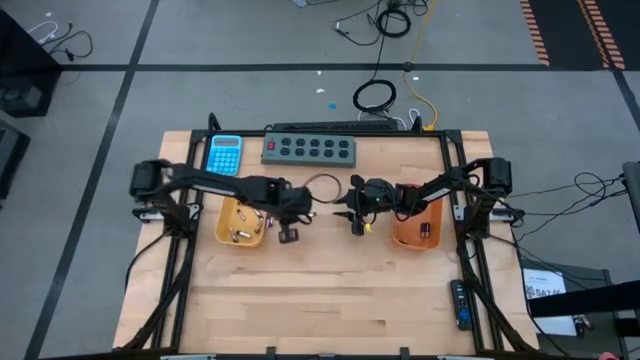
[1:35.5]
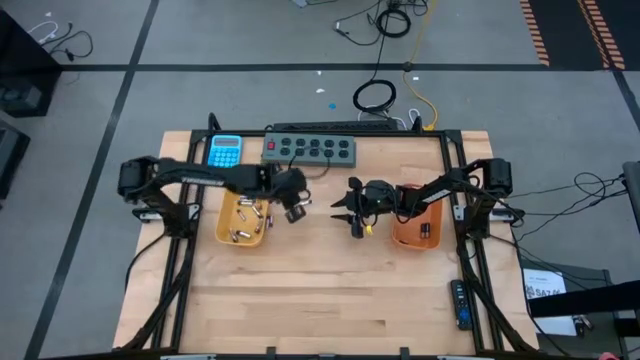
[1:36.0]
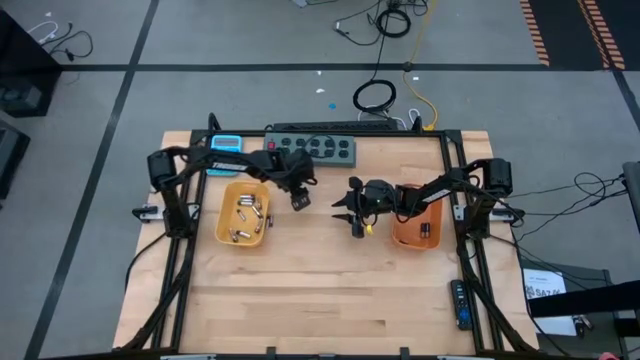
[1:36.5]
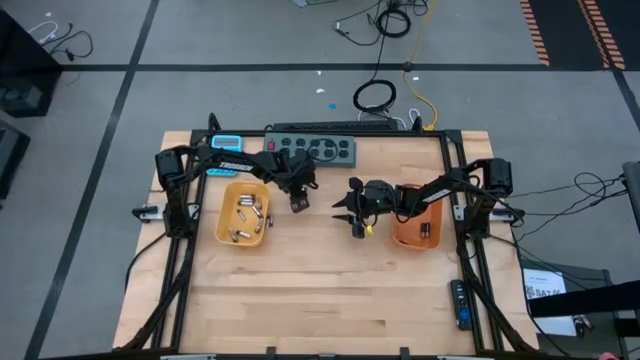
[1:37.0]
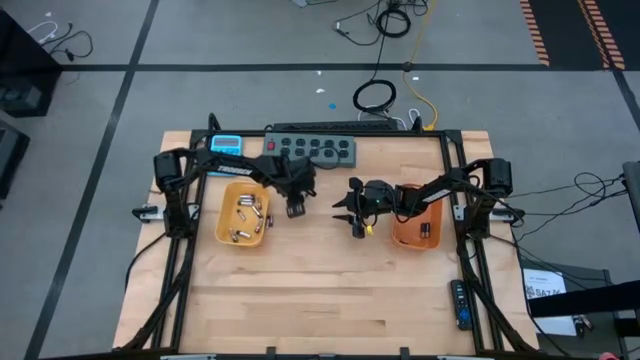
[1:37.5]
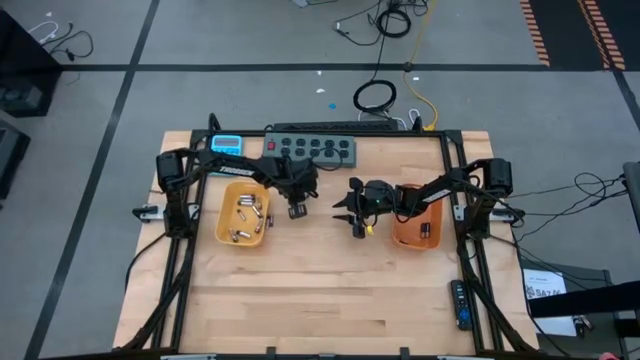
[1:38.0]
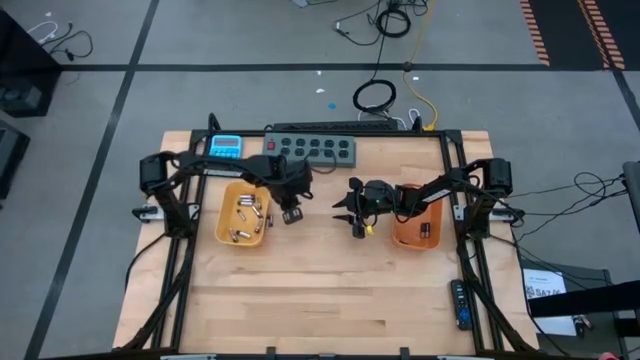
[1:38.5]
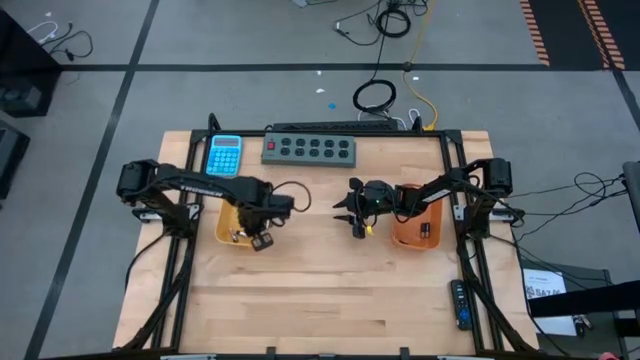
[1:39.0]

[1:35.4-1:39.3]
Task: Sort batteries
Put the white battery into the yellow bin

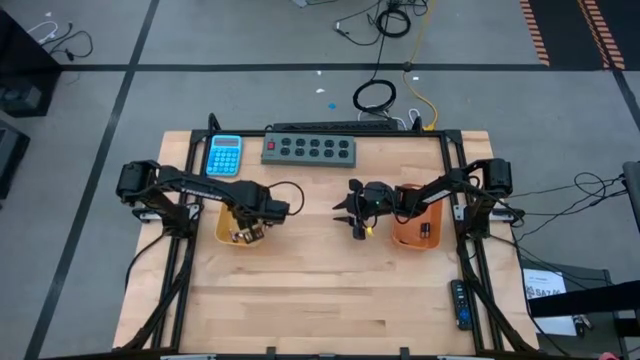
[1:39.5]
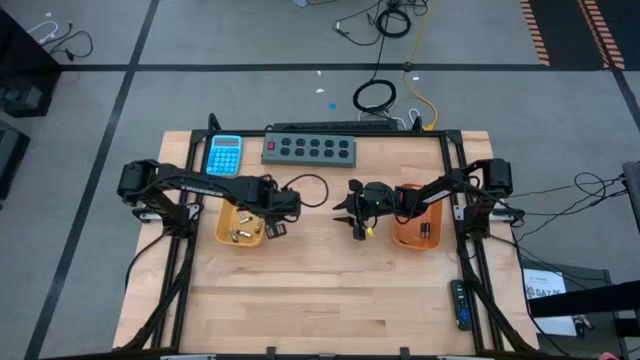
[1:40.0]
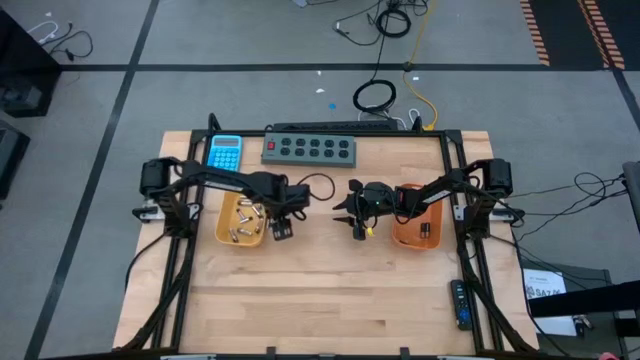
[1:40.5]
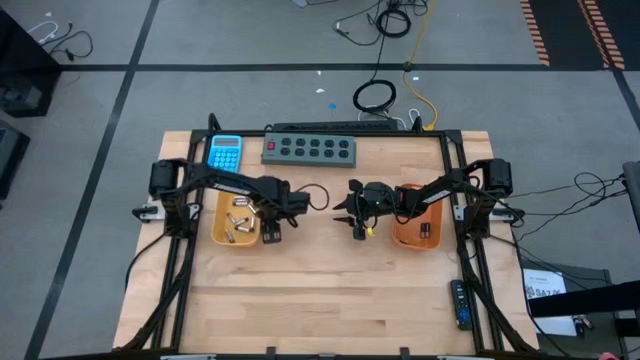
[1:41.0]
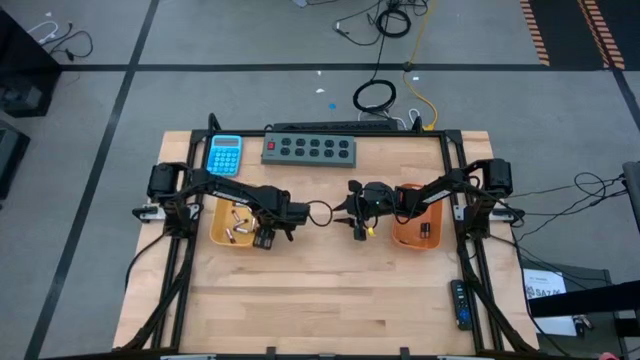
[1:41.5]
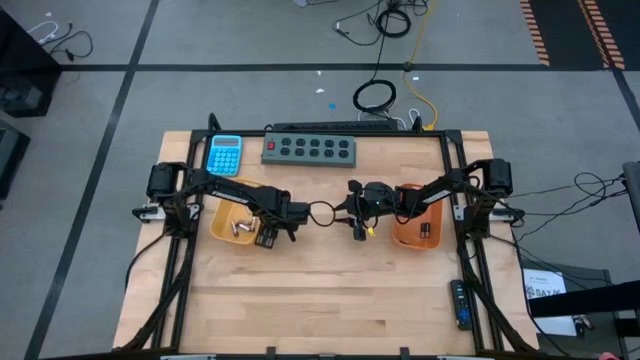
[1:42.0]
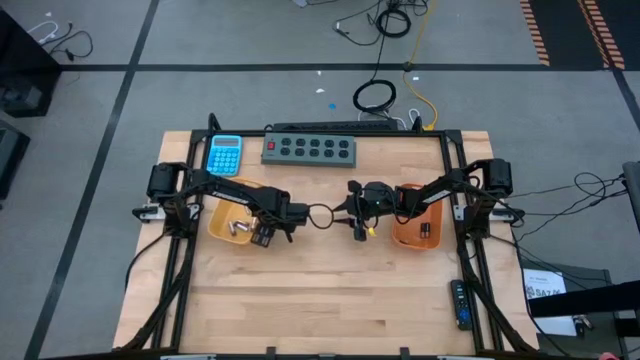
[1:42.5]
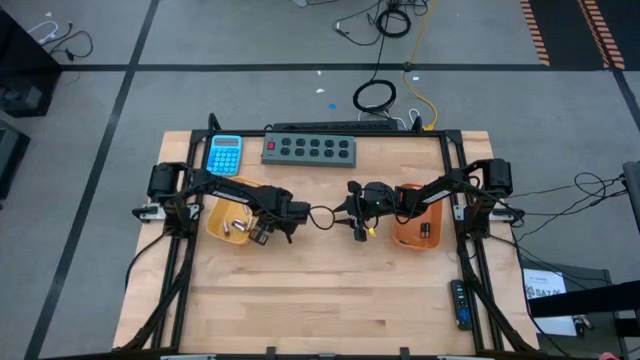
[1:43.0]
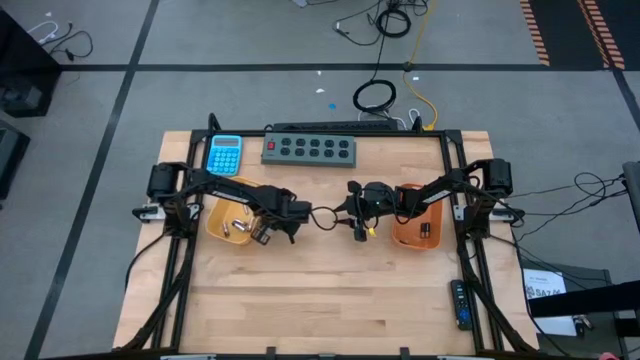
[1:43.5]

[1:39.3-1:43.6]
Put the white battery into the yellow bin

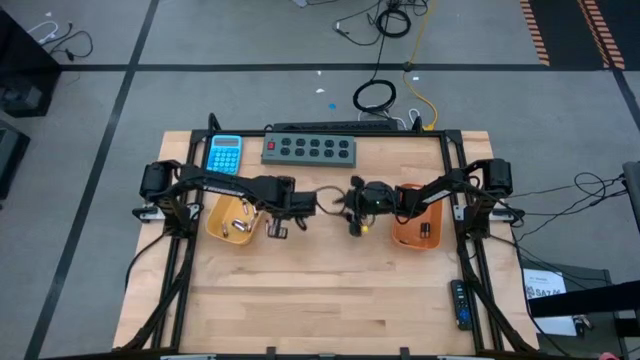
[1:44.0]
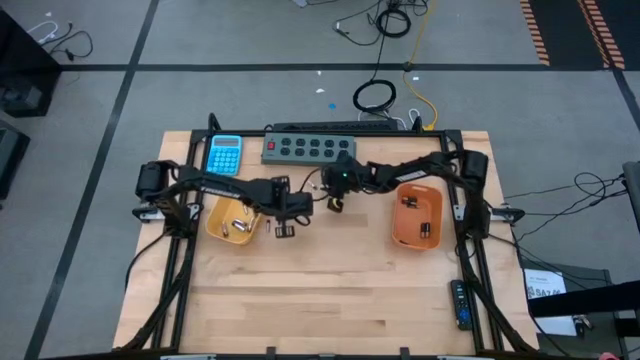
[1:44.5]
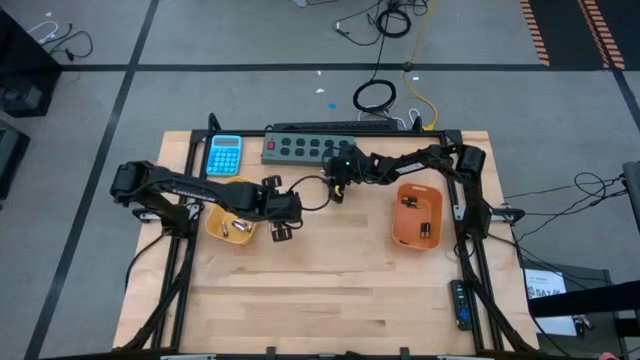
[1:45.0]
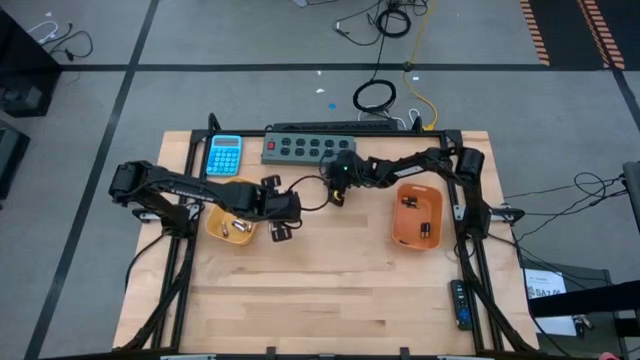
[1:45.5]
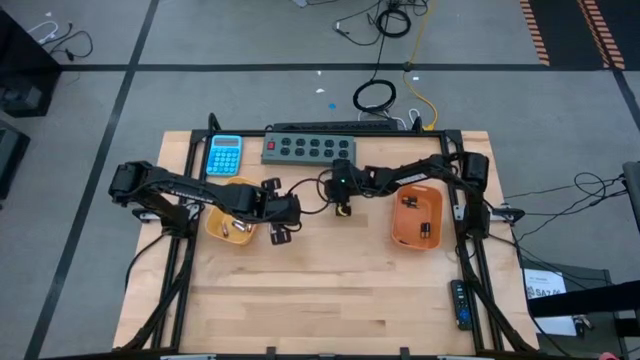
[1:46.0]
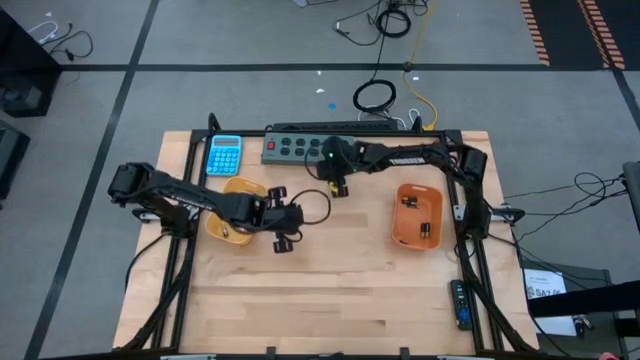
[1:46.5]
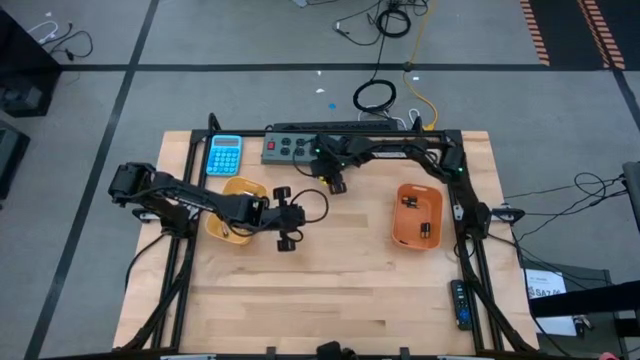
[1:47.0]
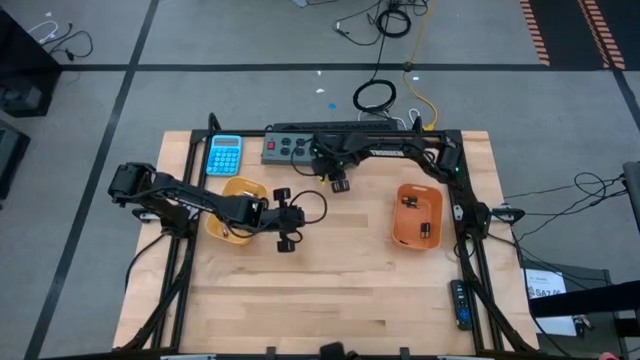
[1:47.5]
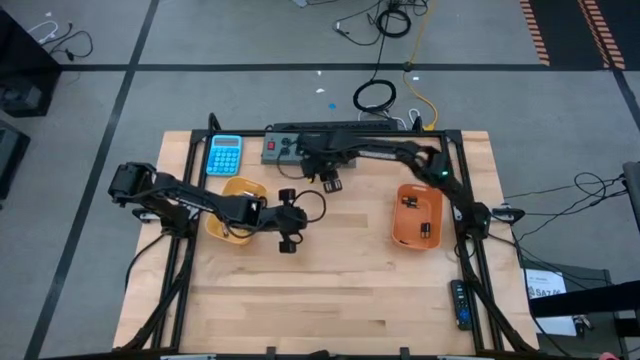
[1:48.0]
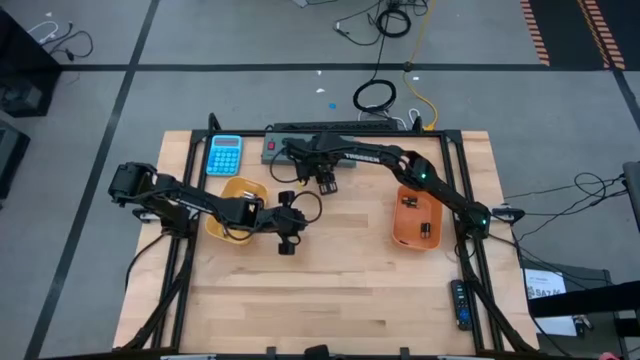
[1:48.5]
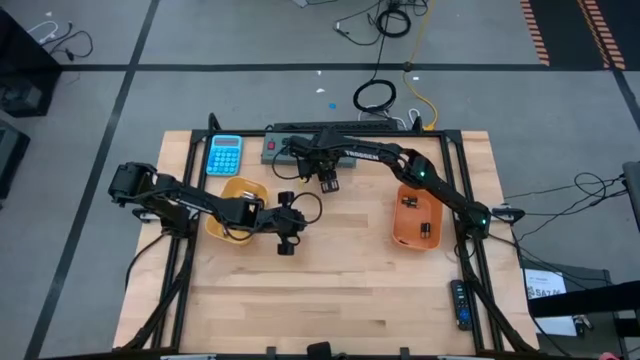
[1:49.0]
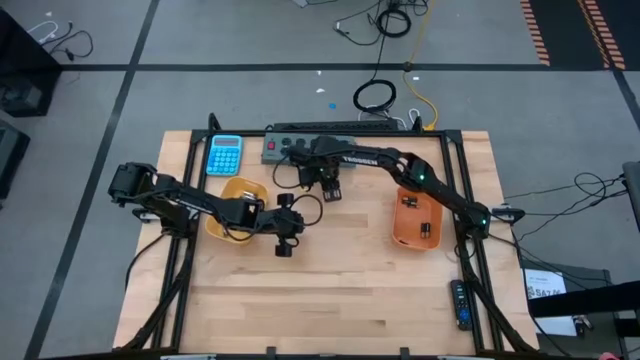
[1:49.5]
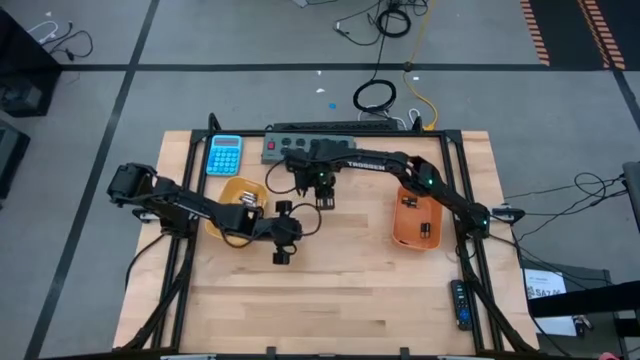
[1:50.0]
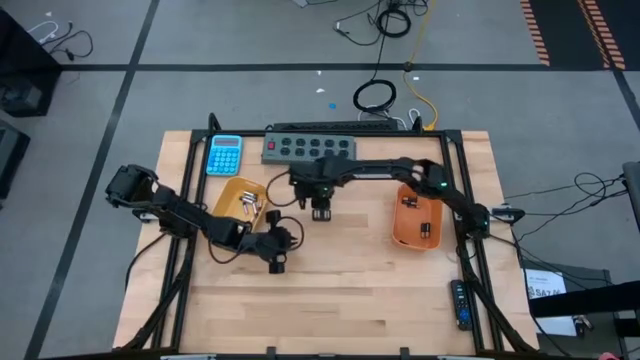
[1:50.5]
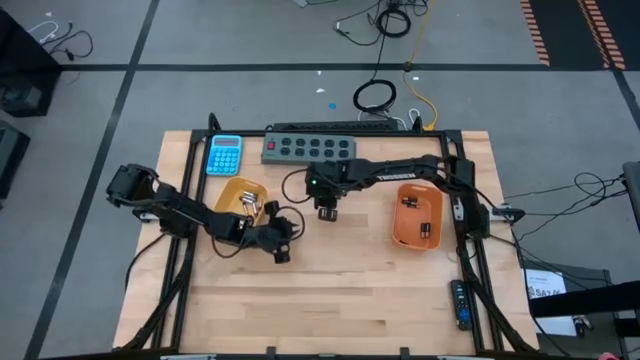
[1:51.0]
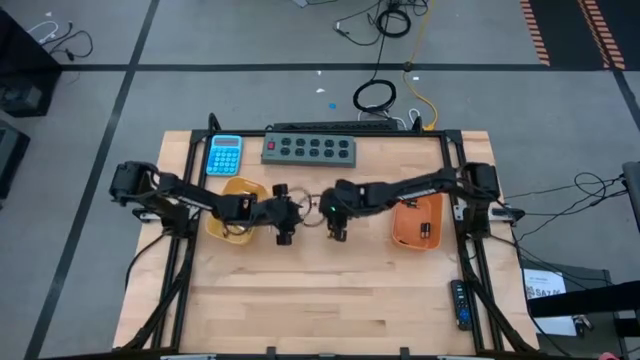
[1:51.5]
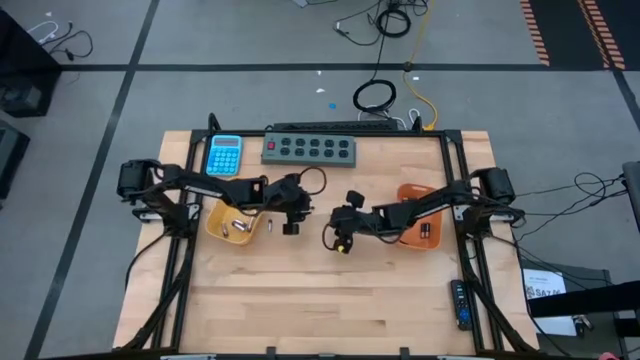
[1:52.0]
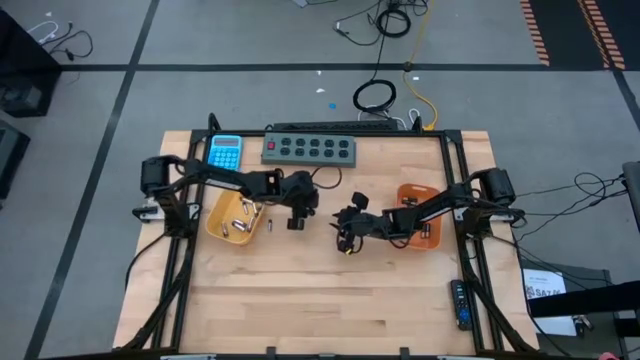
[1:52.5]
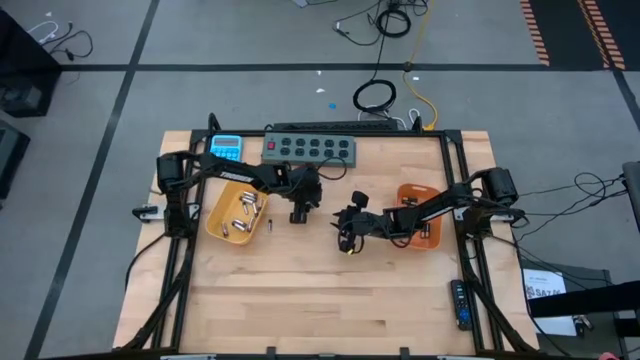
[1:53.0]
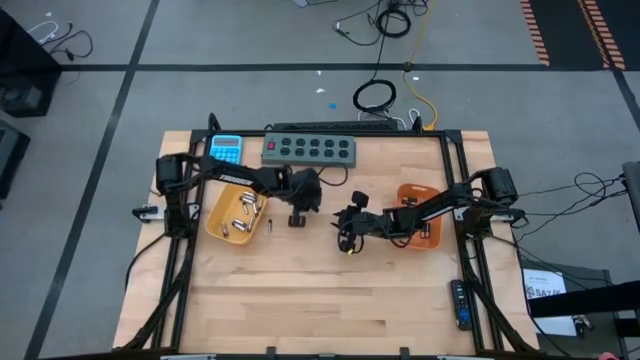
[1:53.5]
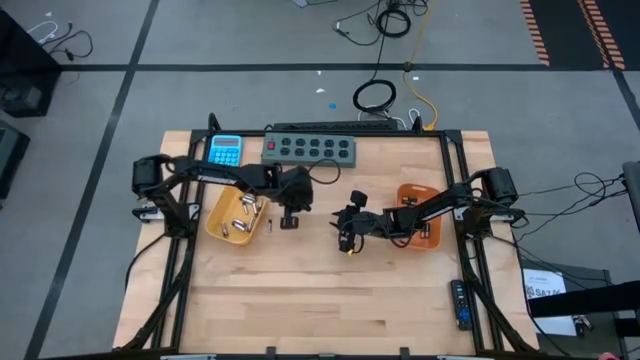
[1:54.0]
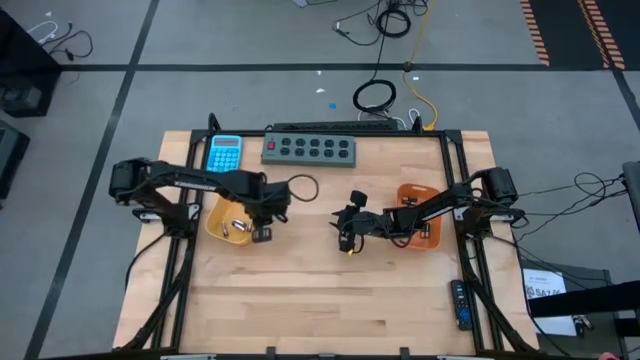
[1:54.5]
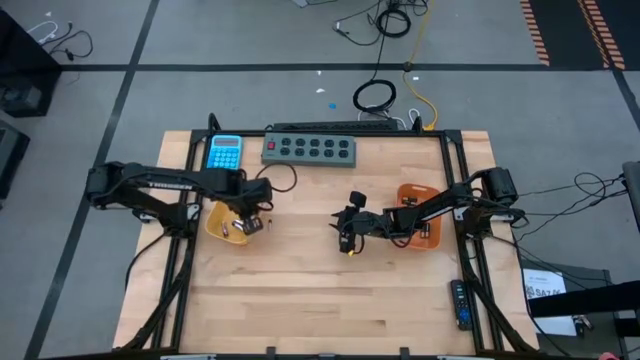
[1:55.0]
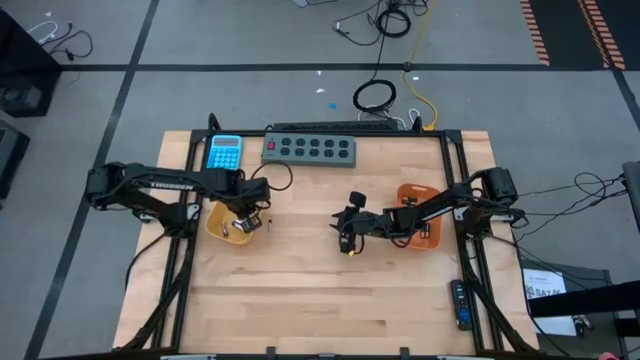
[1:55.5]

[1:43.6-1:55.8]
Put the white battery into the yellow bin
